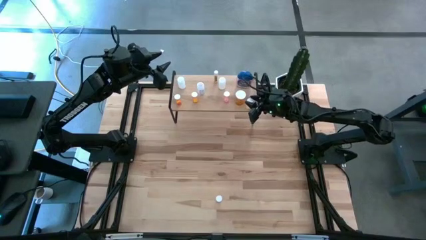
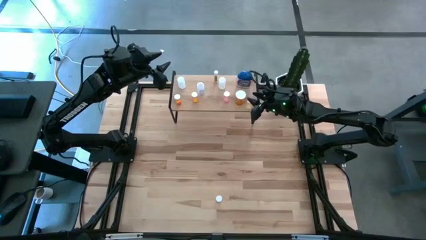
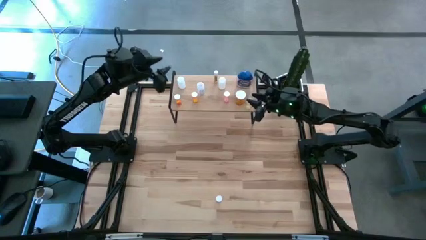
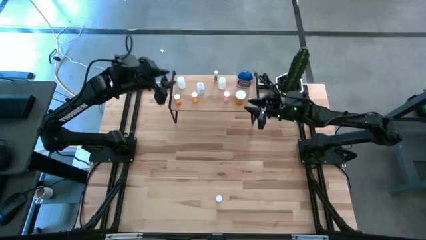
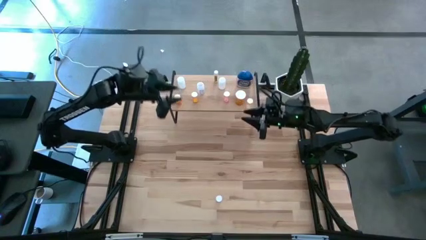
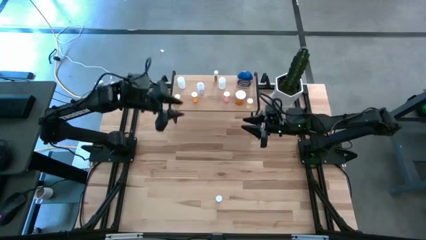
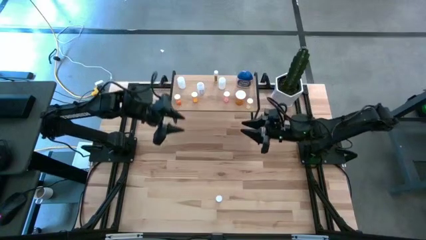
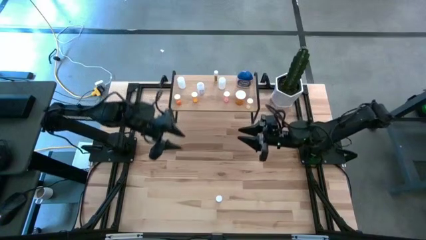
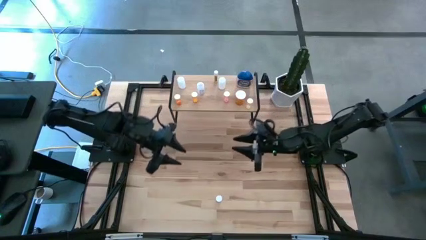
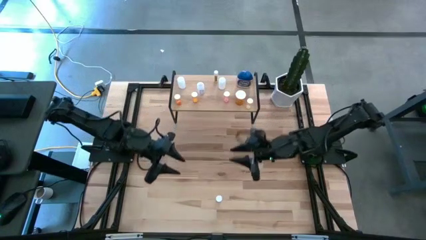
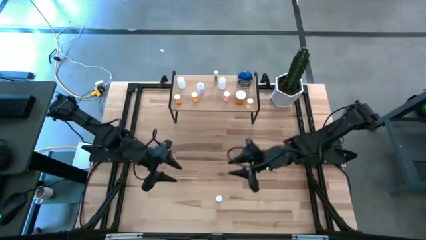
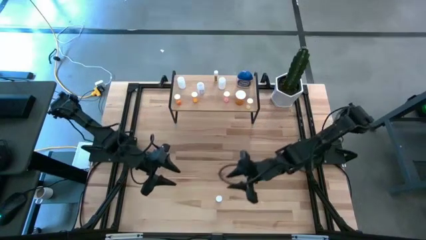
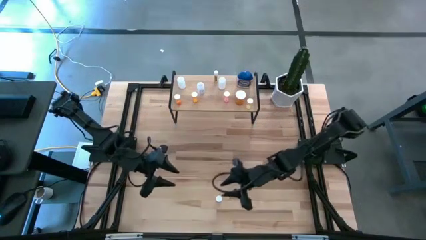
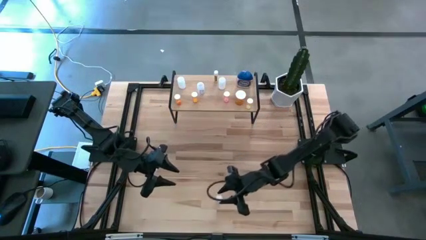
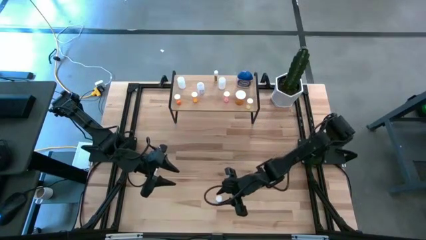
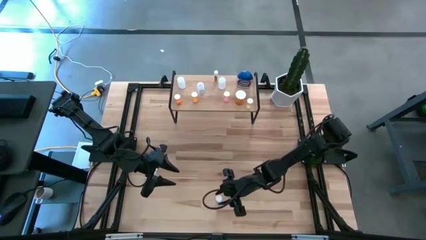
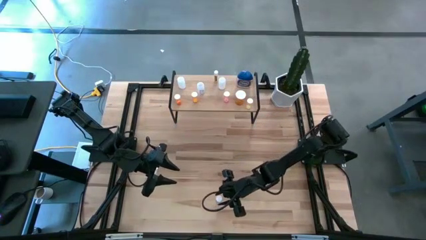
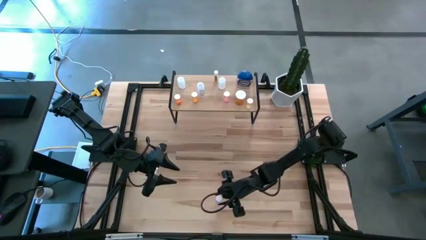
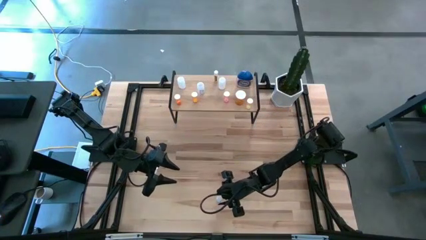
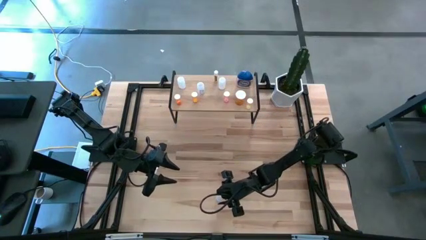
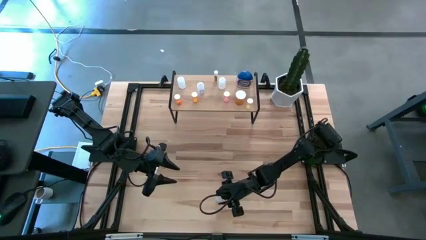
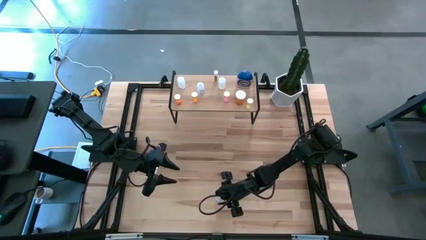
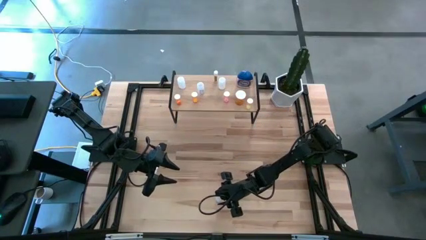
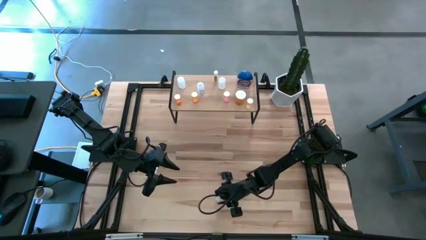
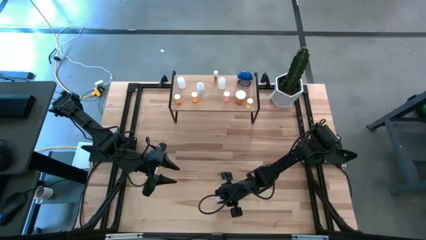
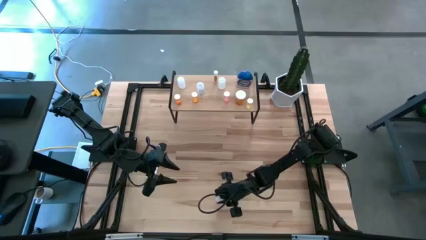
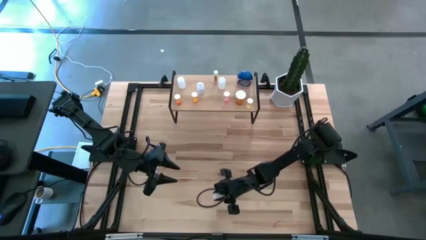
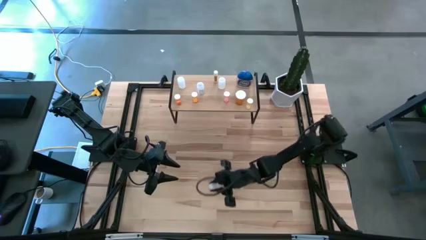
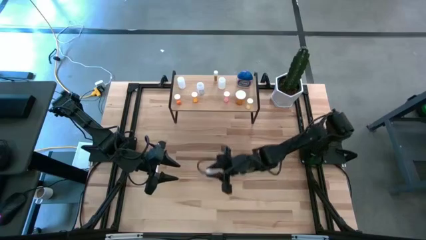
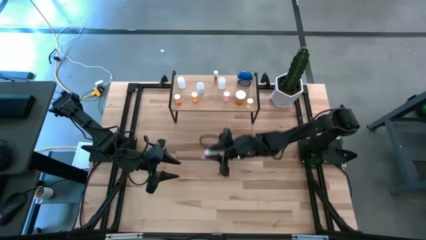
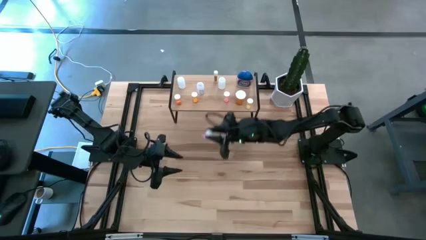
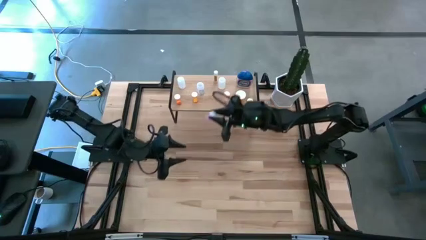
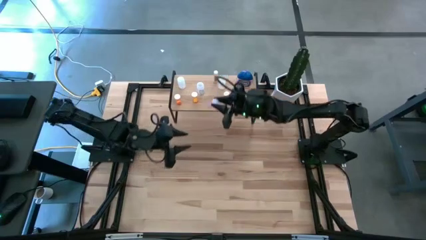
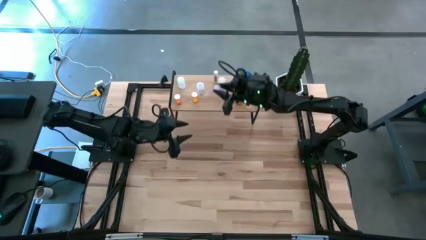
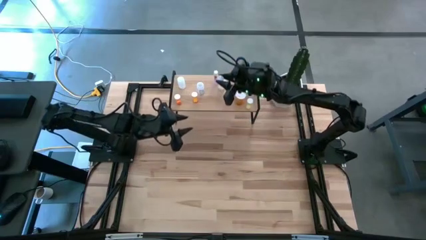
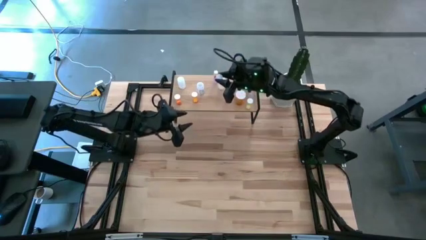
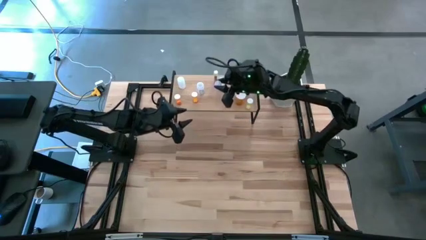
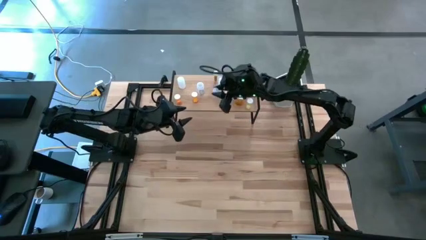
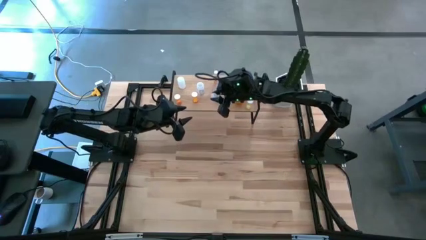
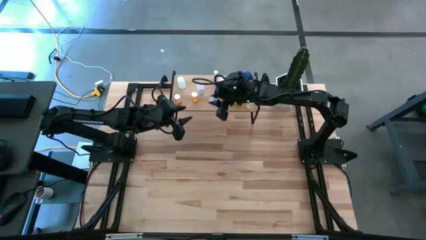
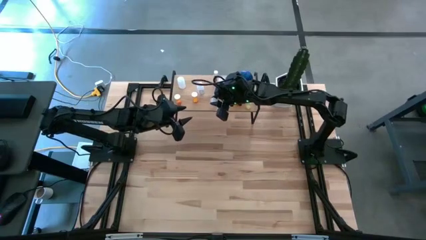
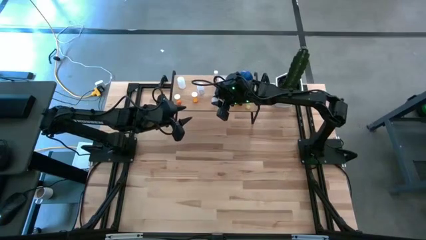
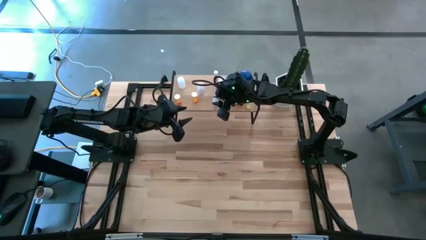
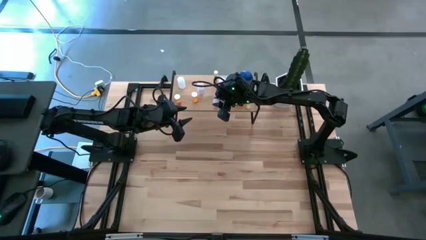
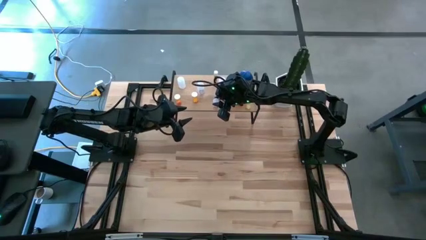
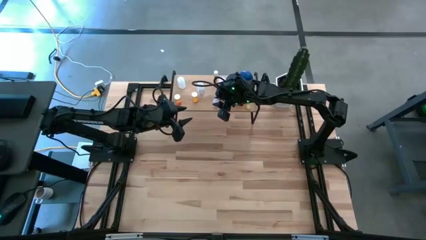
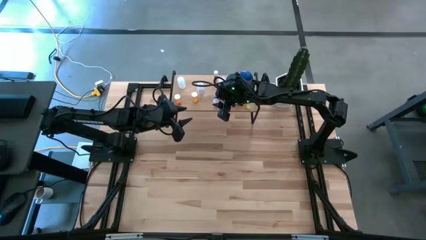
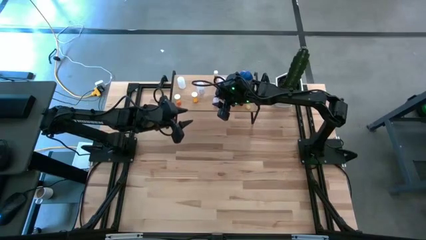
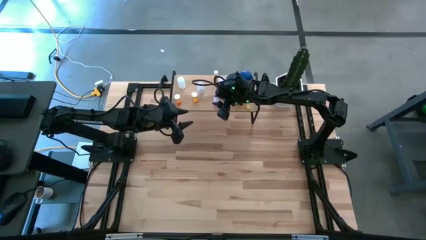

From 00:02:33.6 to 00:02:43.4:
Task: Pick and place medicine bottles onto shelf by color
Put the pink pill bottle on the shelf

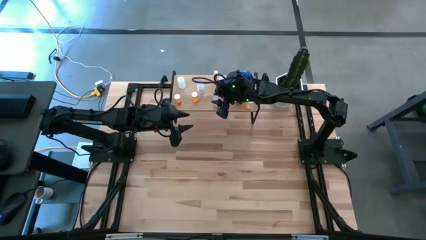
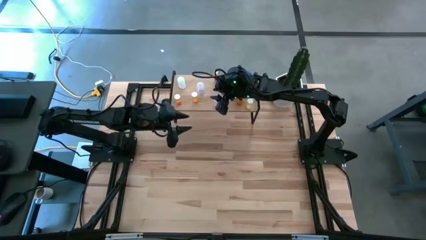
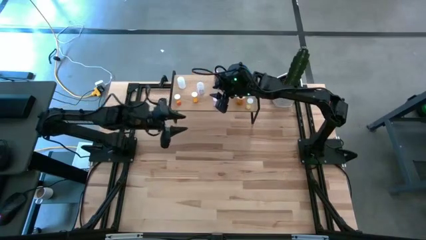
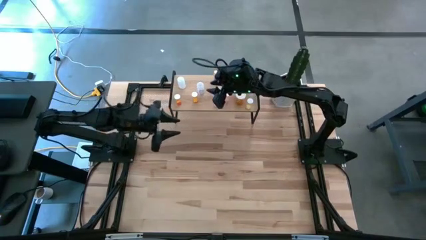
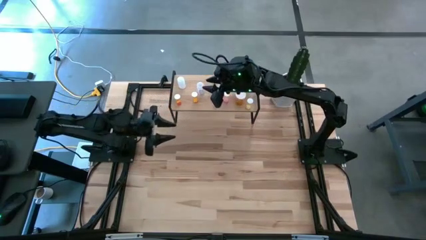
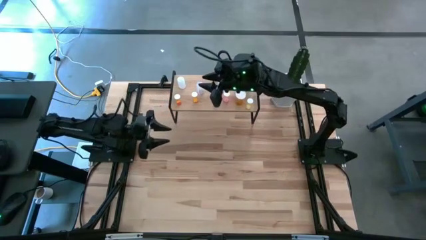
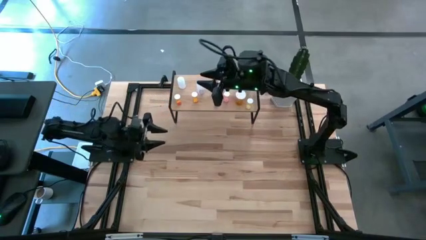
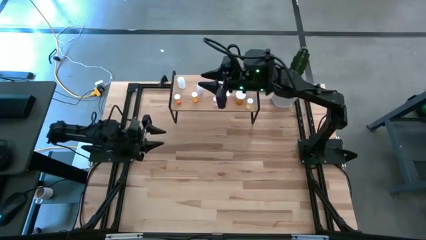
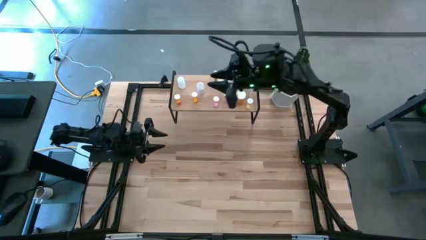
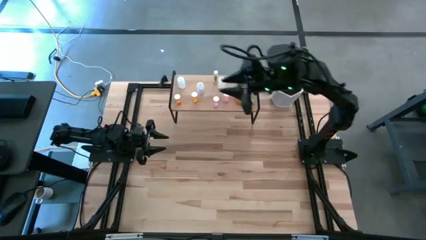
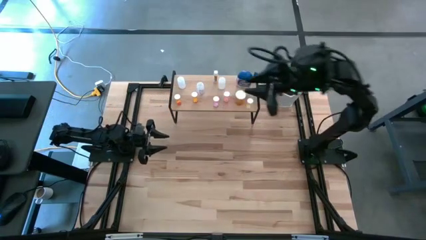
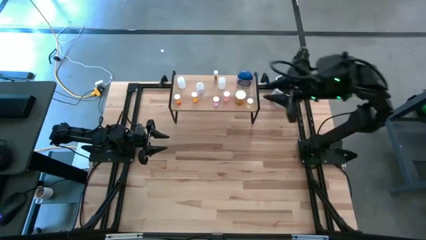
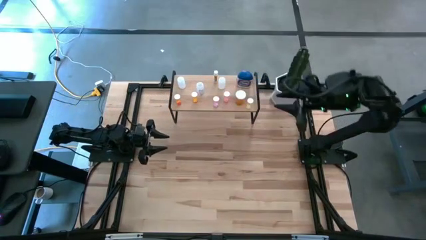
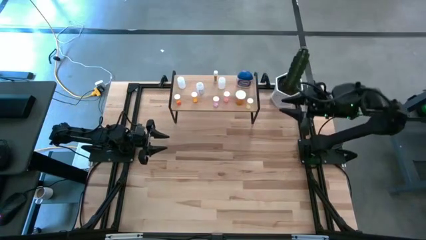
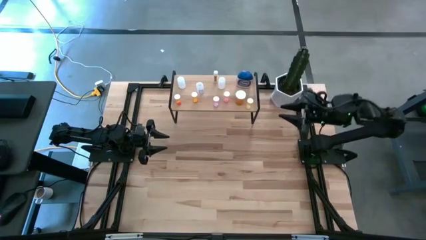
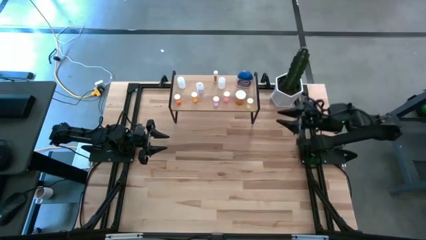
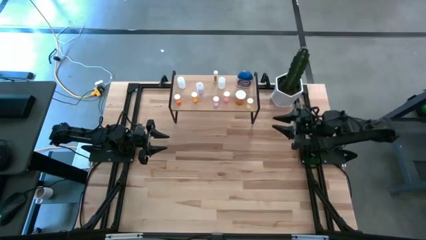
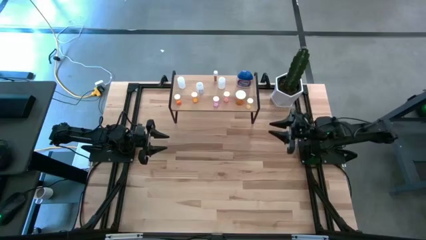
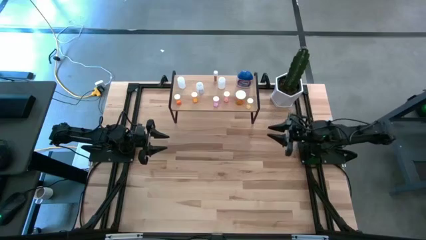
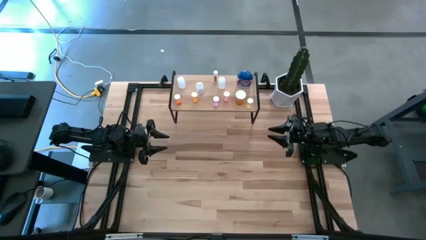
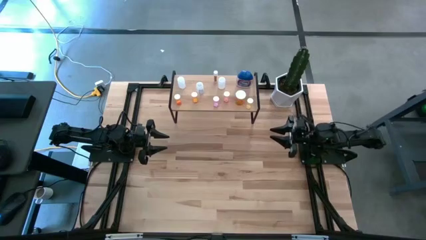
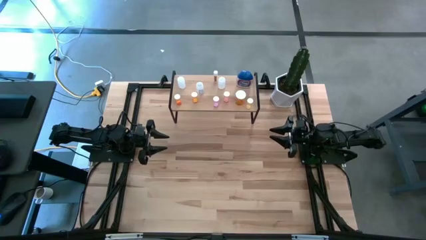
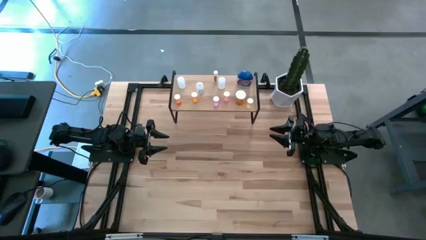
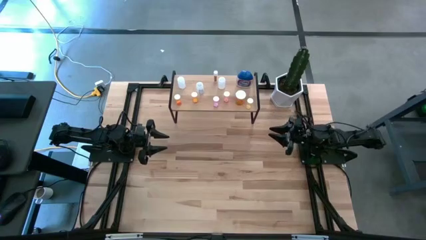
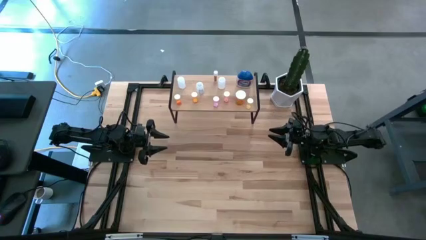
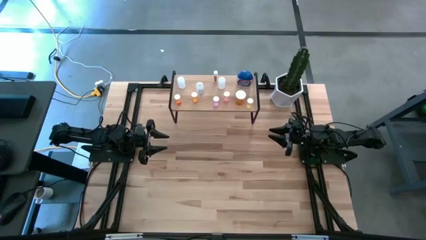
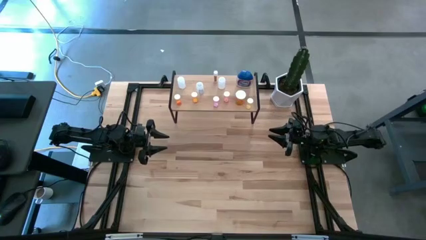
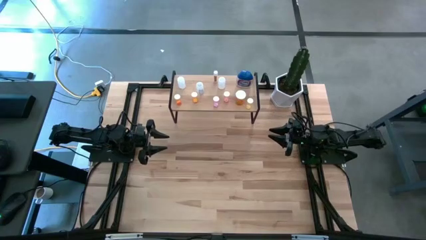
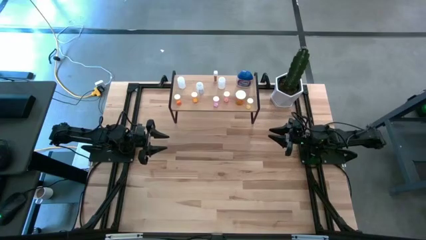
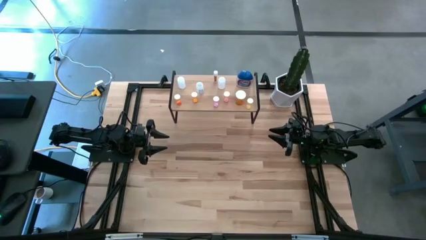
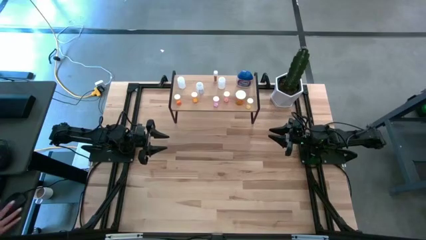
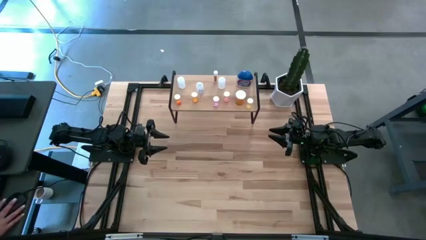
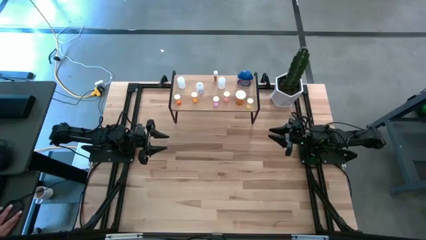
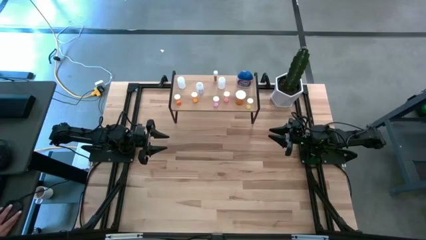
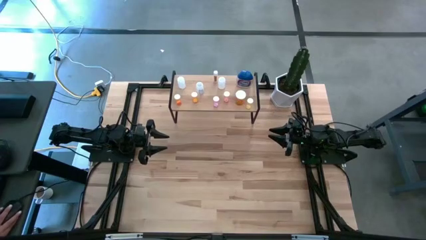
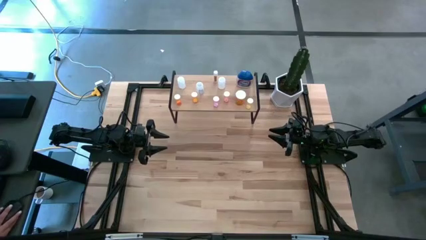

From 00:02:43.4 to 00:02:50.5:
Return to Home Position
